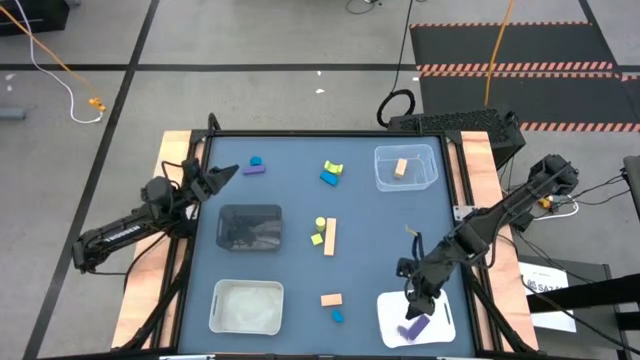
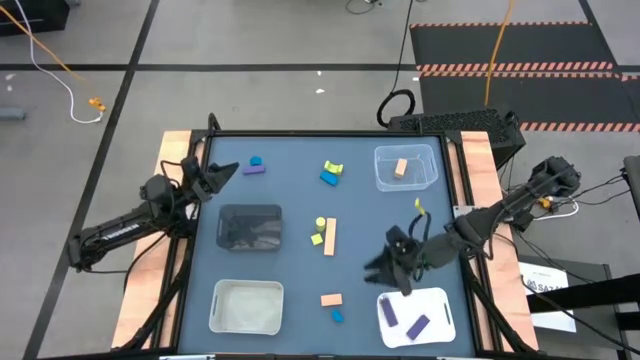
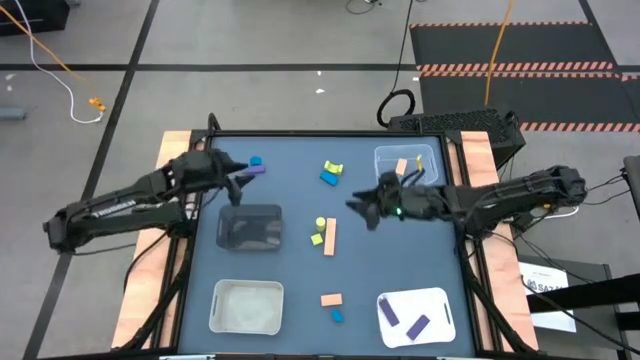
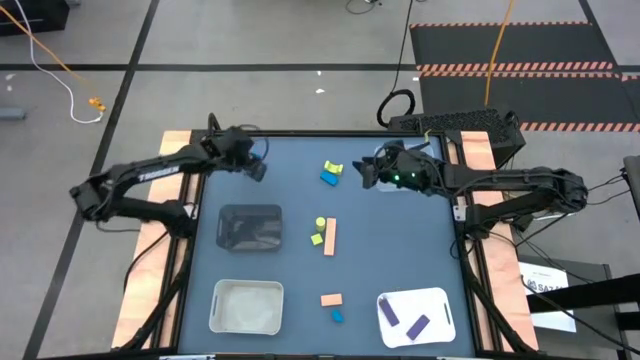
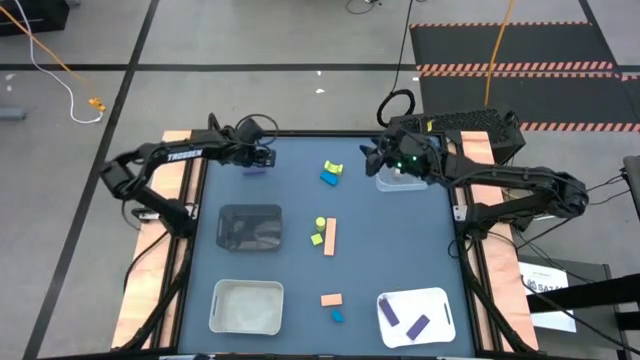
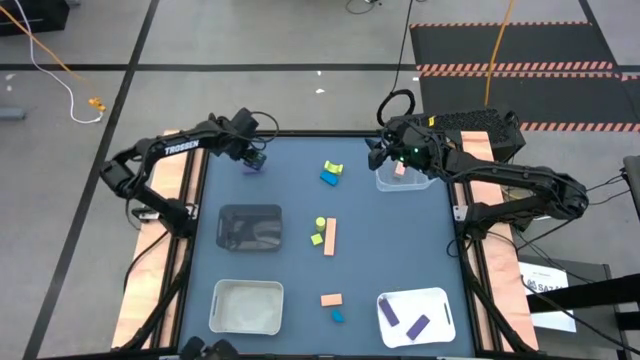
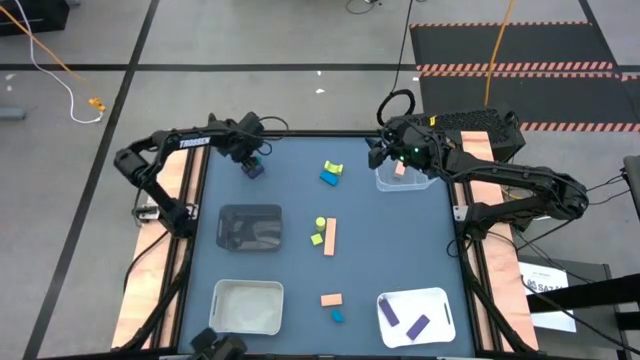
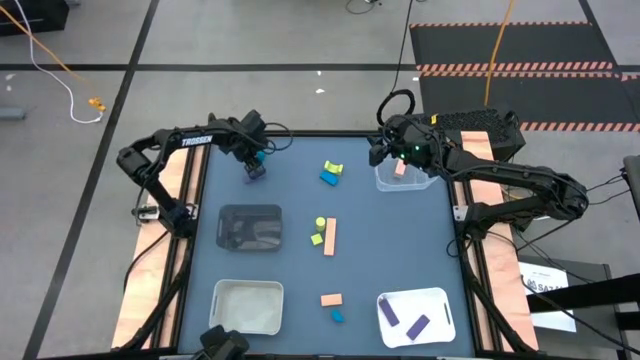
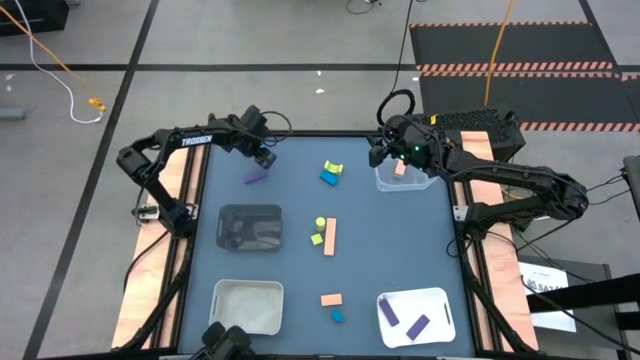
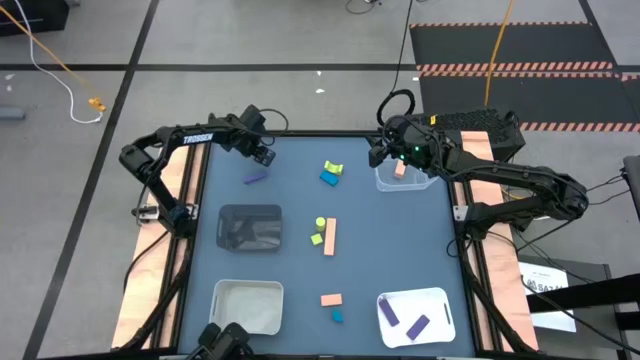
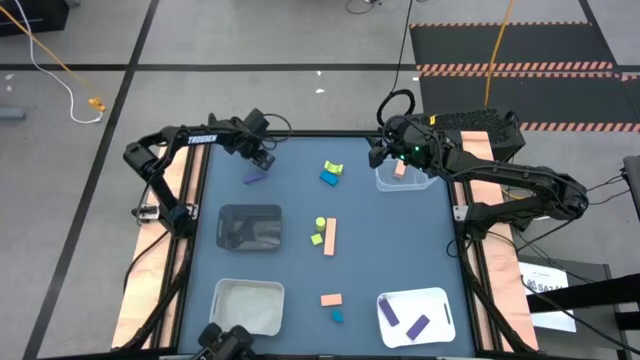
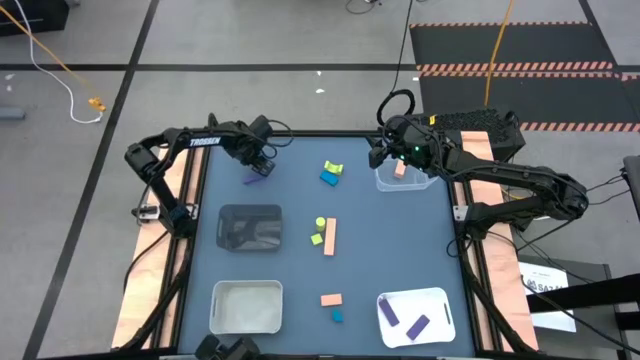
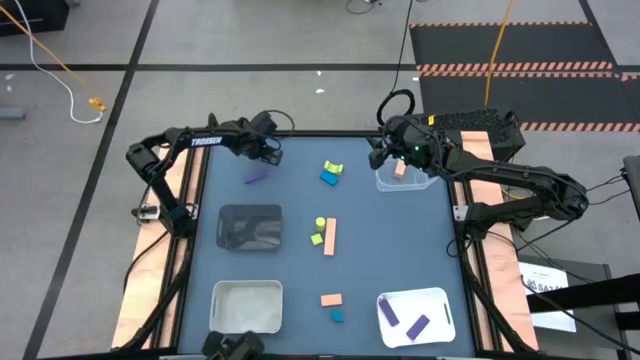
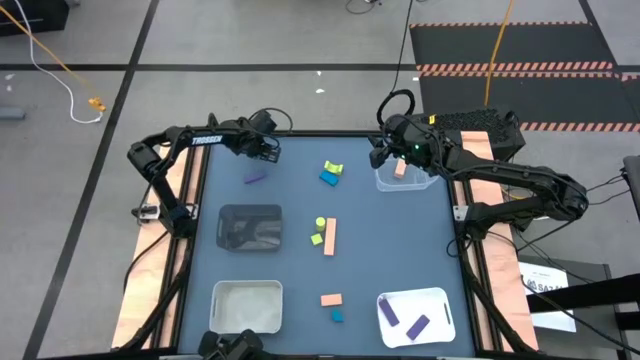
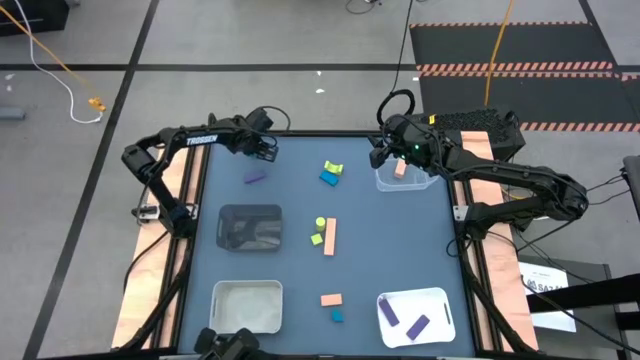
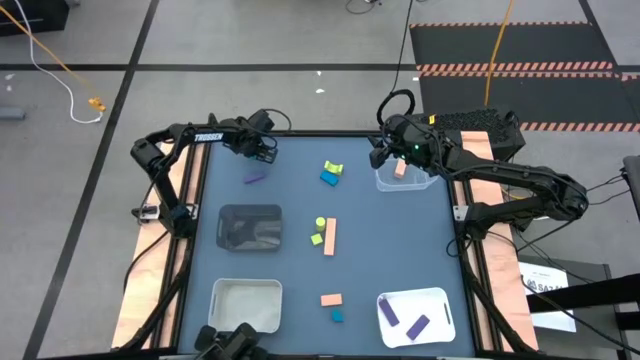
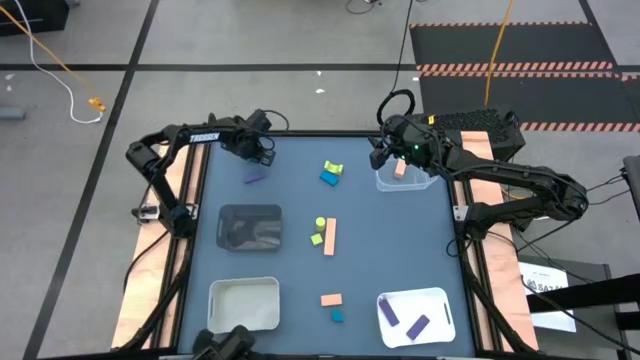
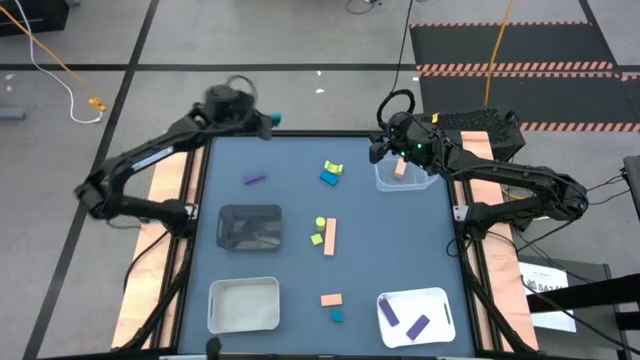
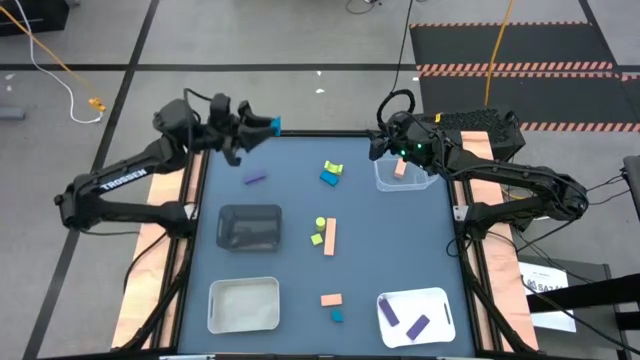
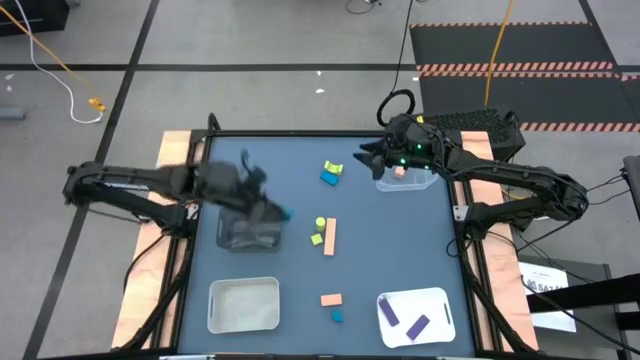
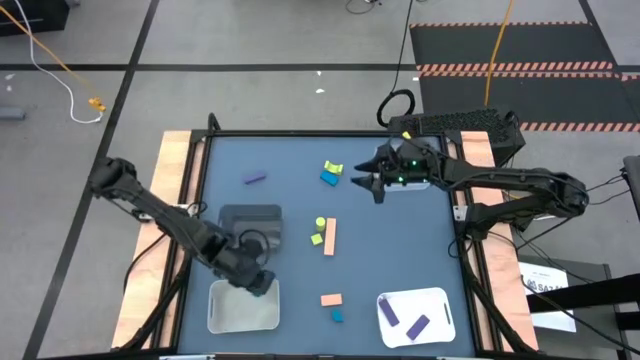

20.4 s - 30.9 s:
Task: Sort & place blocks by color
Put the top left blue block into the gray bin

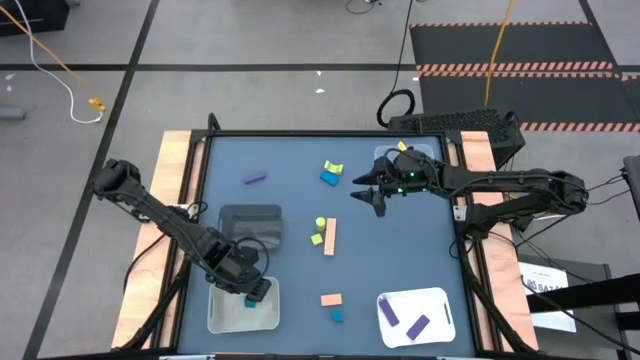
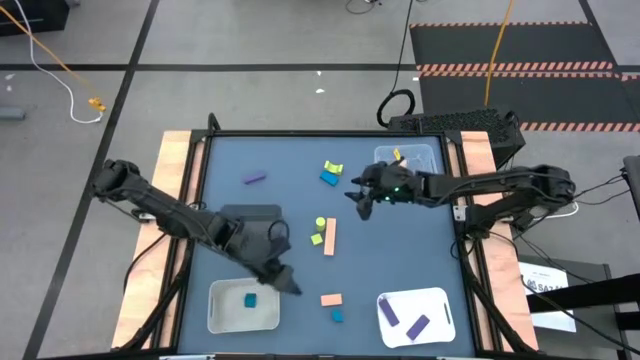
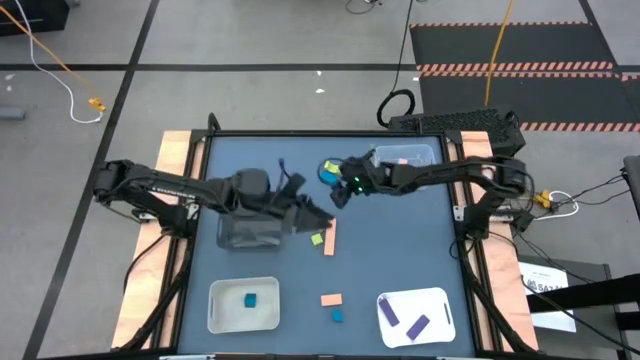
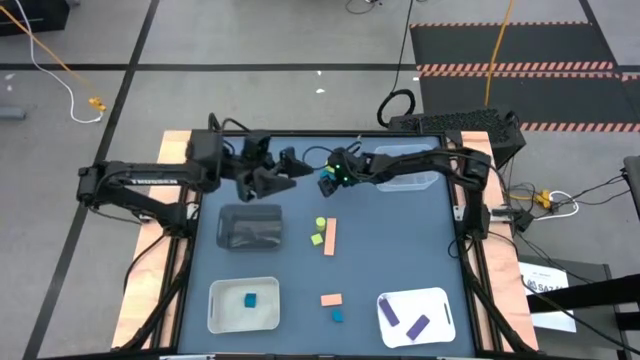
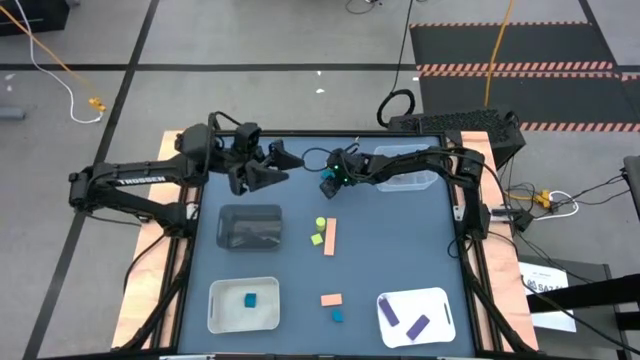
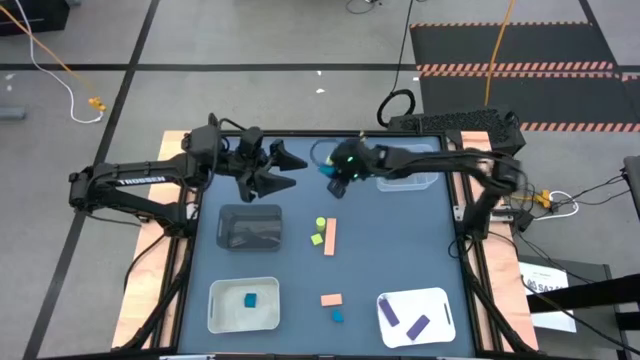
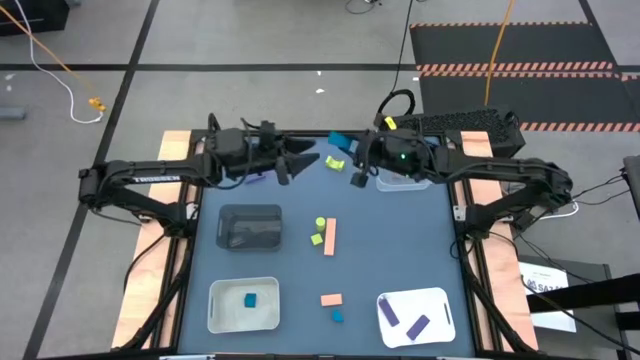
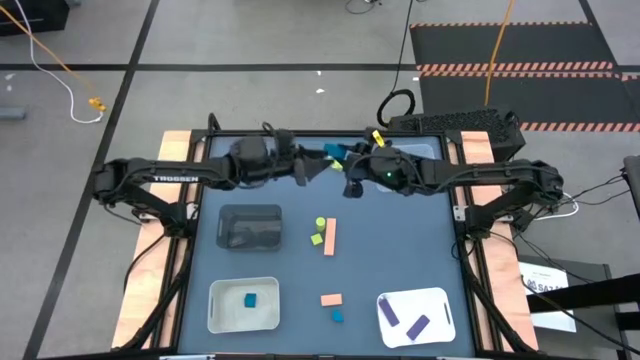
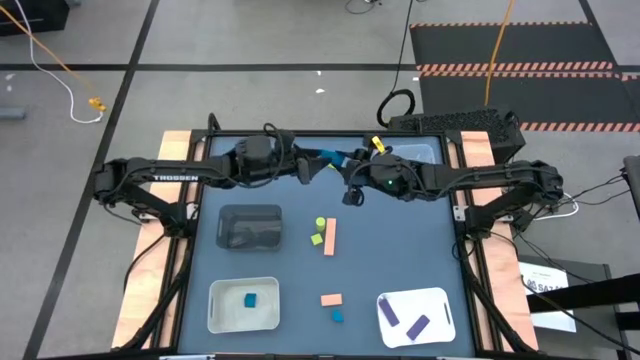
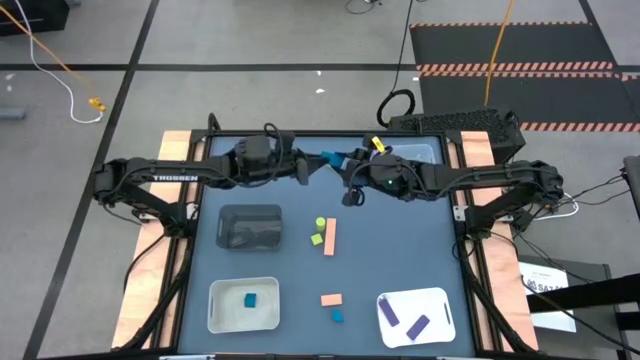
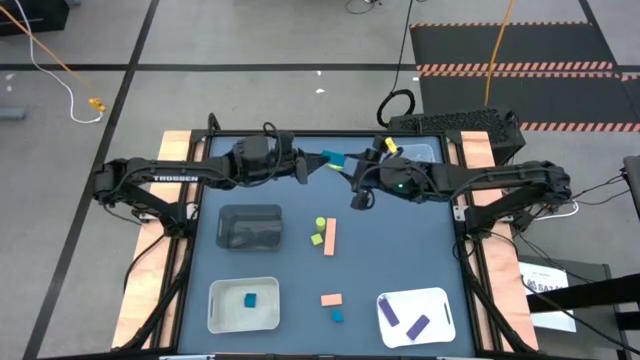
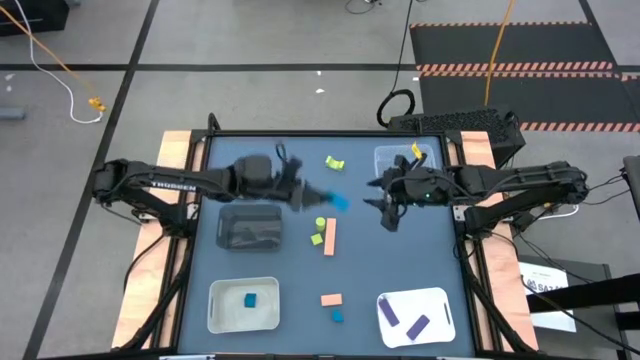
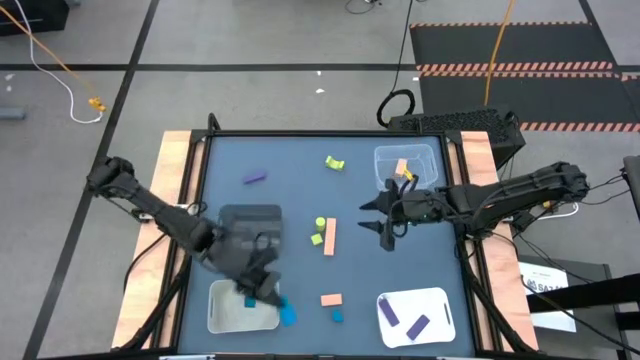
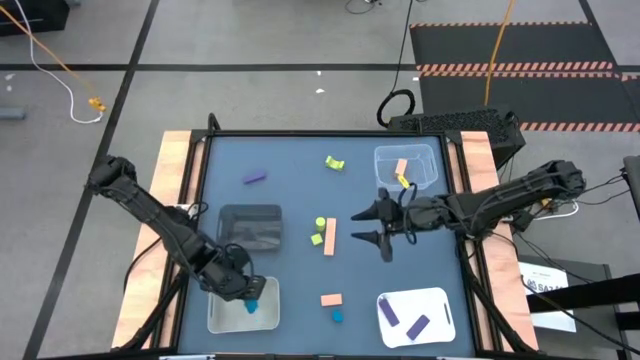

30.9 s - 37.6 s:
Put the top blue block into the gray bin

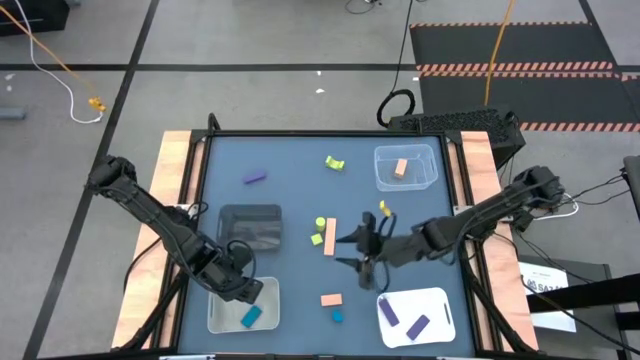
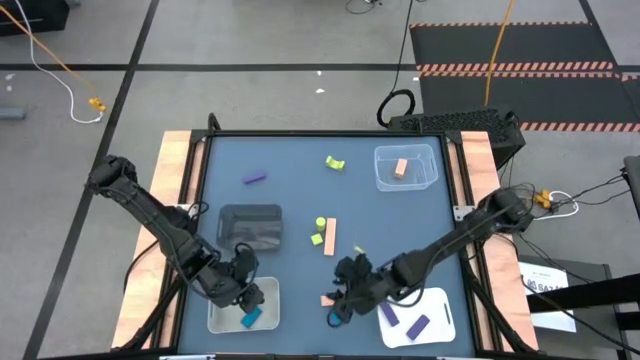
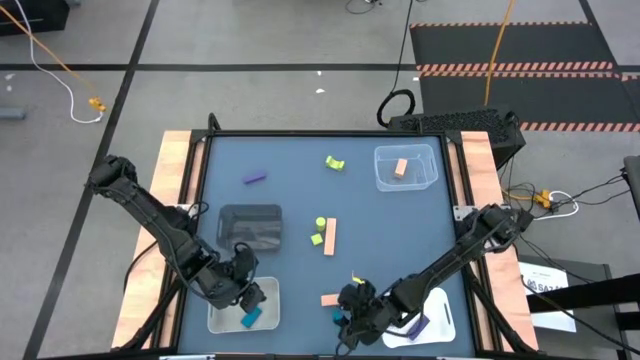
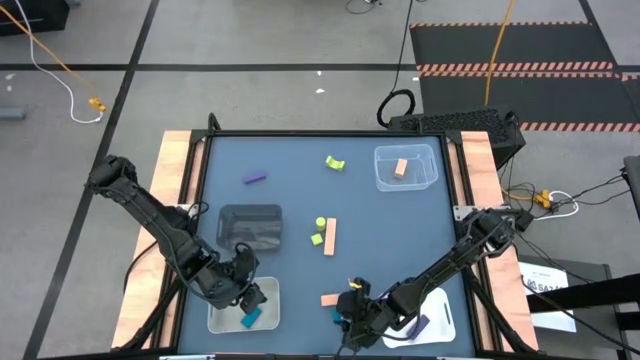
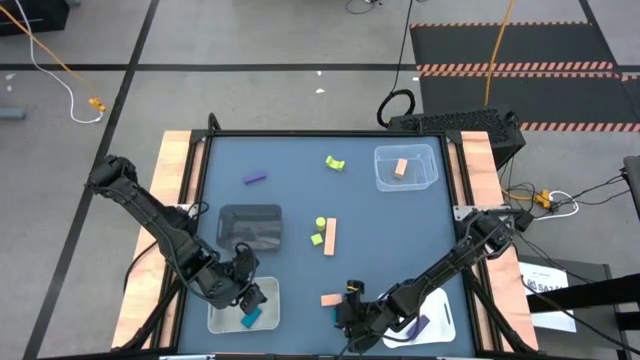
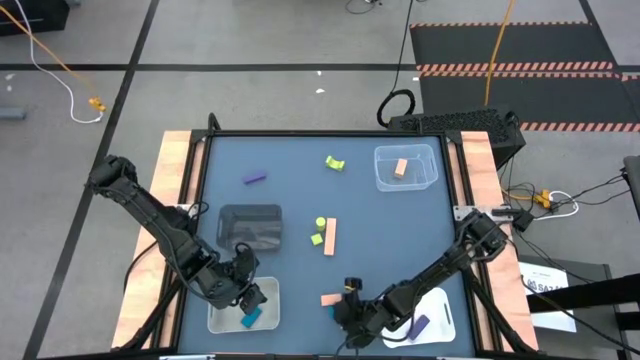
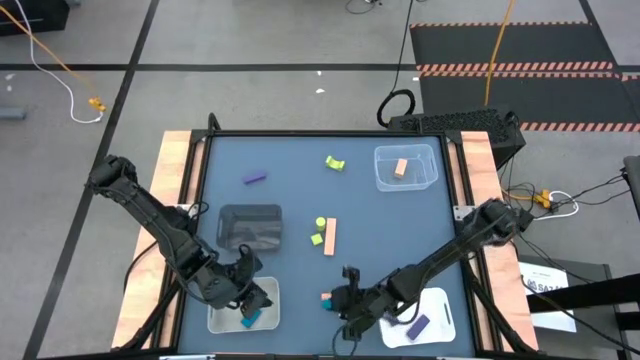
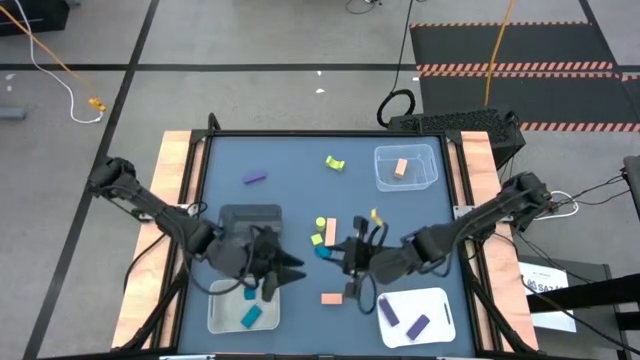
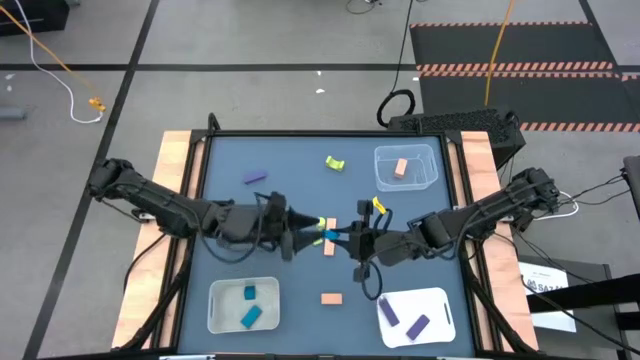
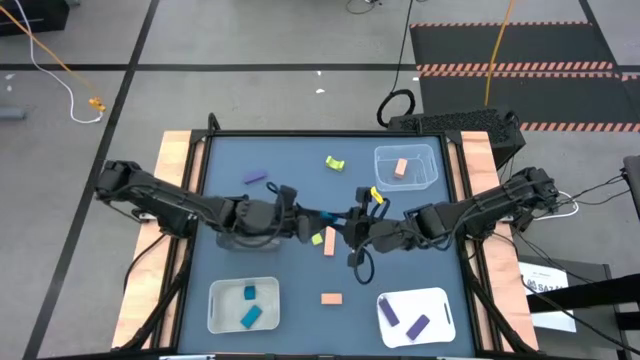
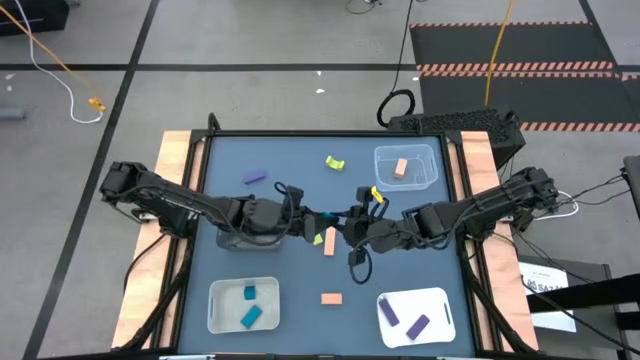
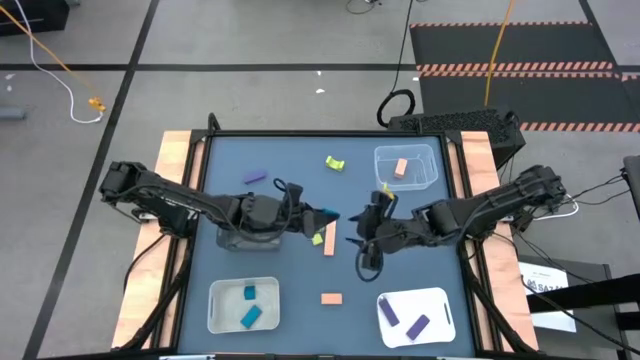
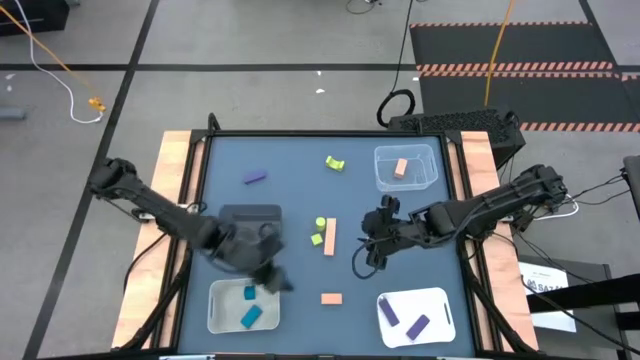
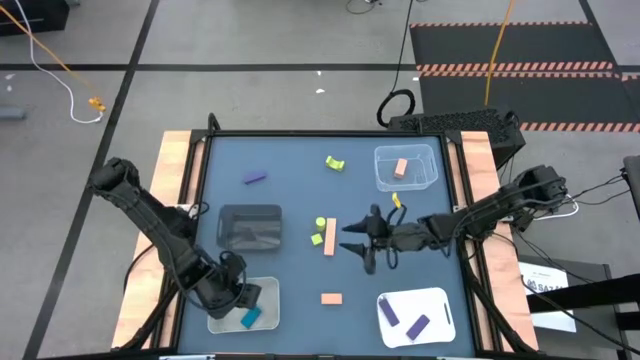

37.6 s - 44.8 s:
Put the blue block into the gray bin
